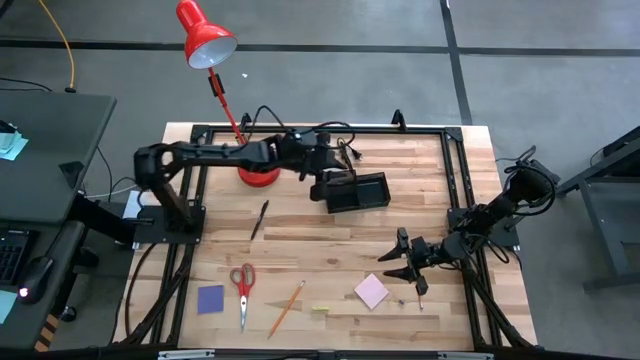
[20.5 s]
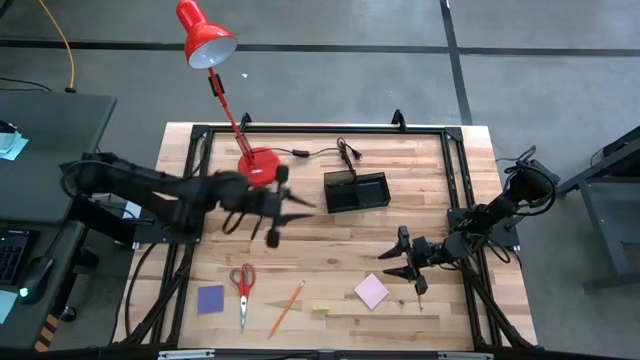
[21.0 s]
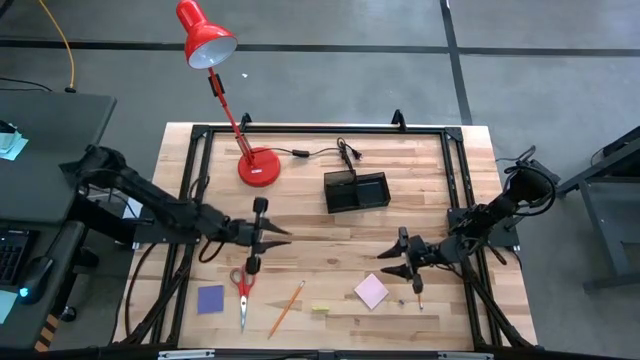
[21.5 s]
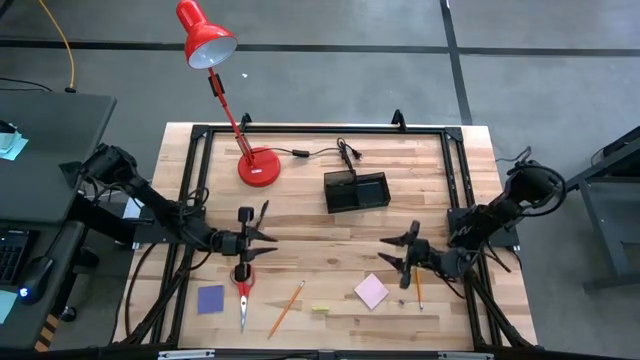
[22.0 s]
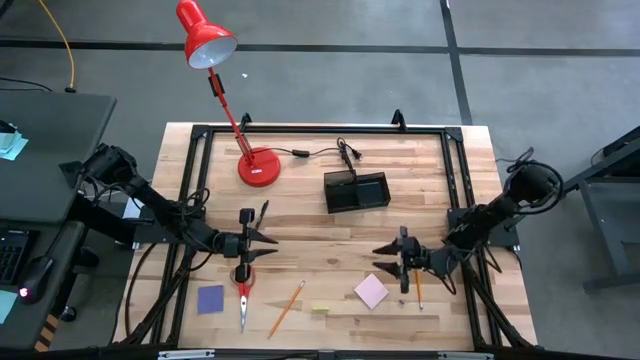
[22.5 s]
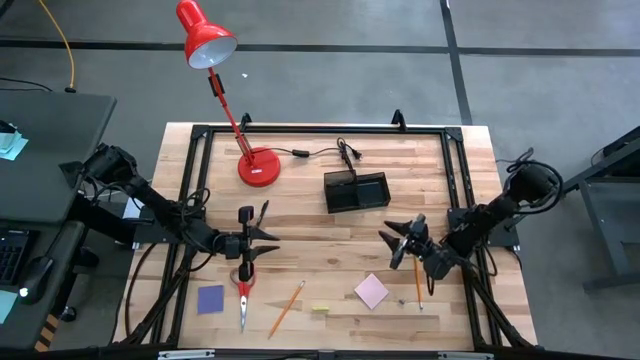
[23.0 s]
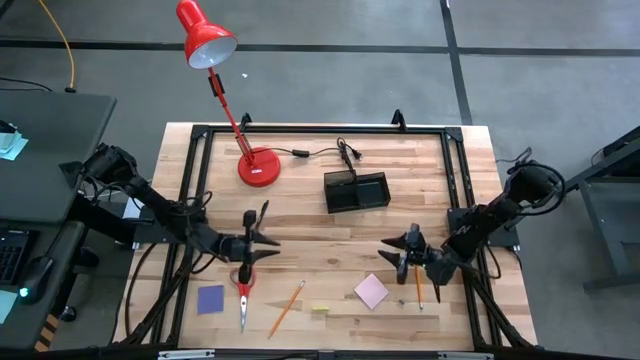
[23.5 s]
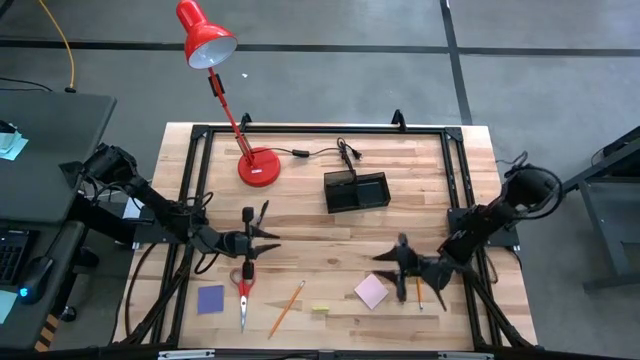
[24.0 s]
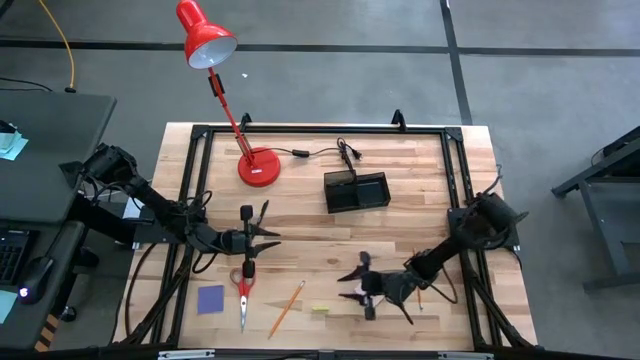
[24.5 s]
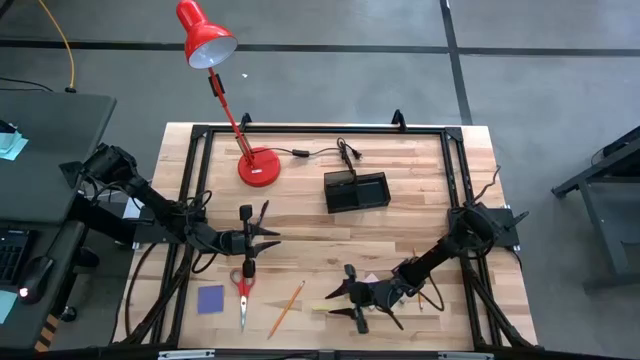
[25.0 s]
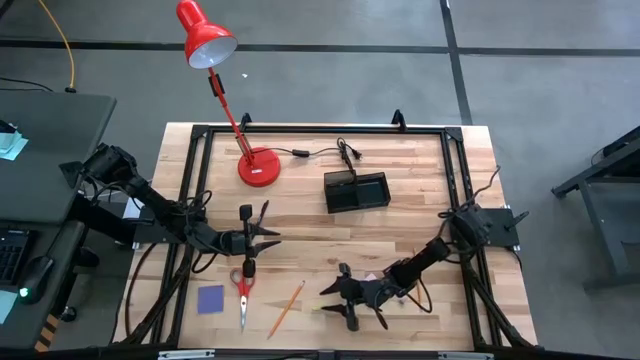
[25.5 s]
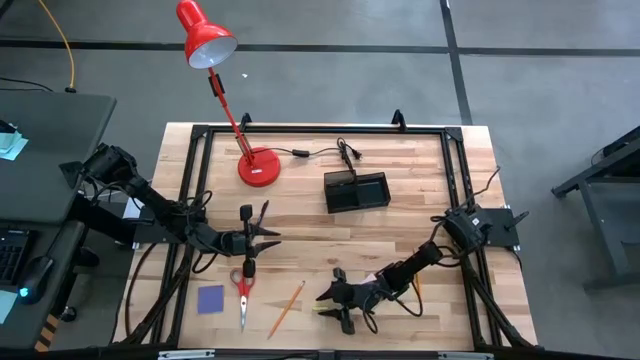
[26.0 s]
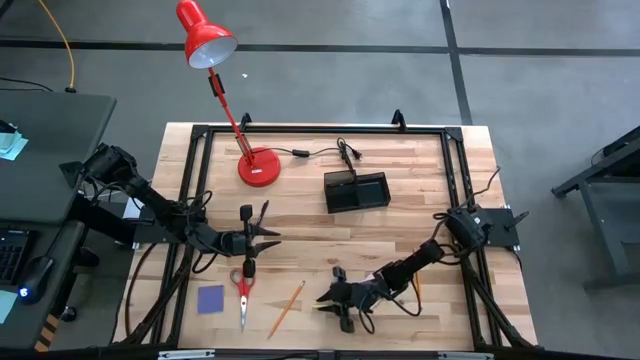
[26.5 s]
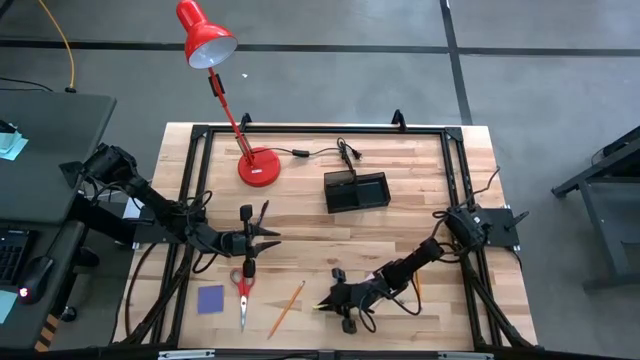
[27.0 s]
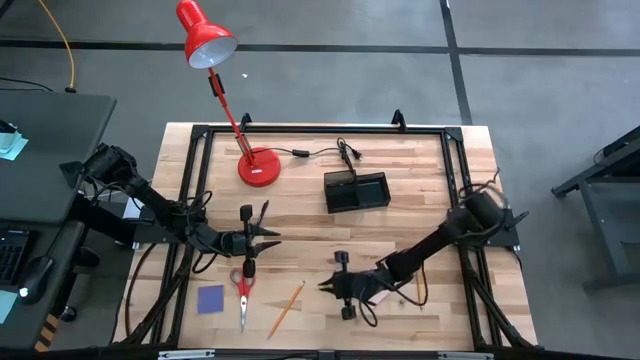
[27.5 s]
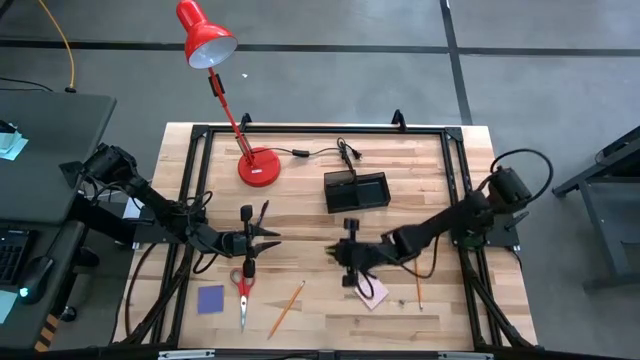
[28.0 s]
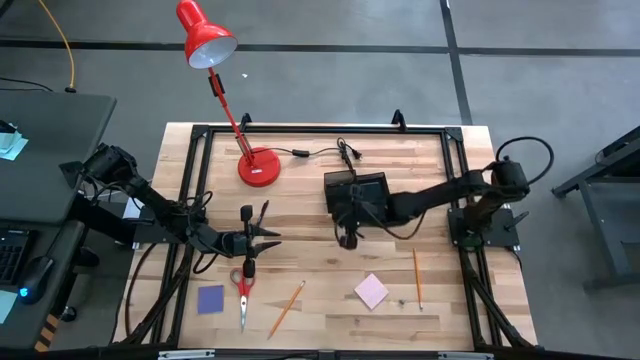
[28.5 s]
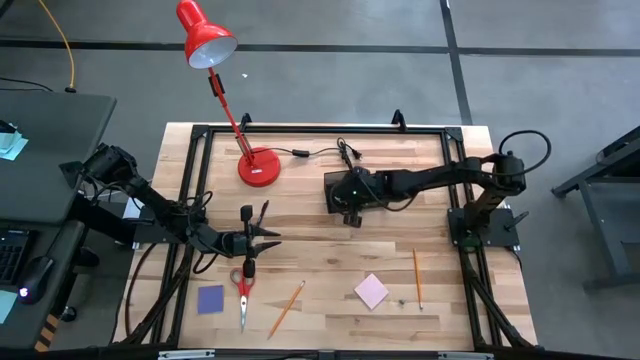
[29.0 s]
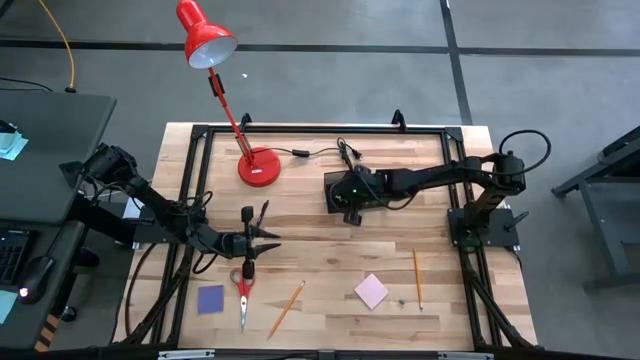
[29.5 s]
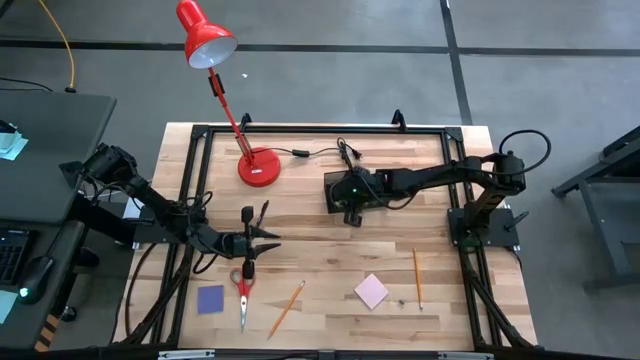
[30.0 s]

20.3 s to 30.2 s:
Task: Pick and place office supplies into organizer
Put the yellow eraser into the desk organizer

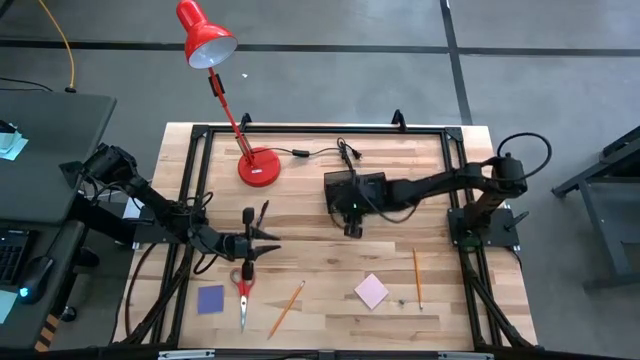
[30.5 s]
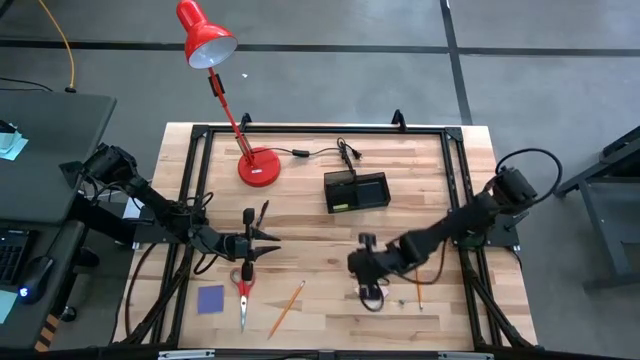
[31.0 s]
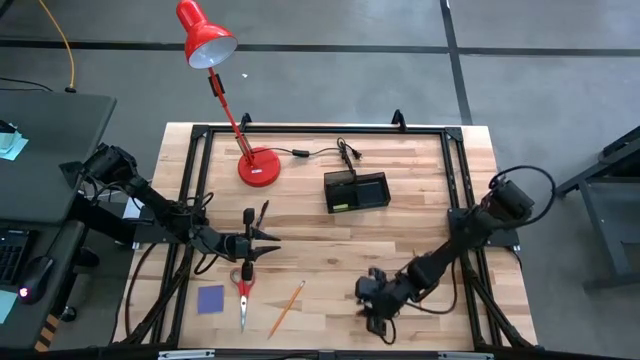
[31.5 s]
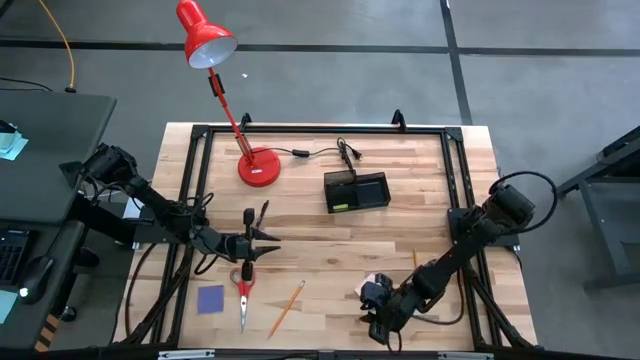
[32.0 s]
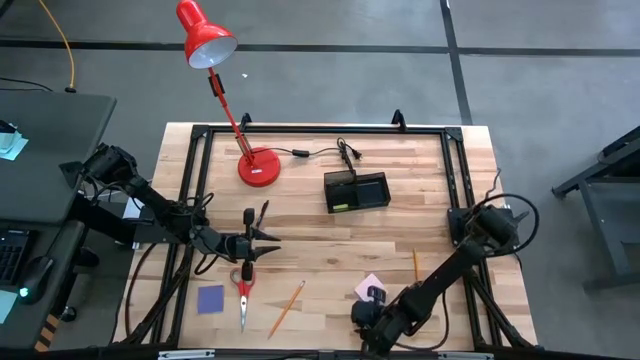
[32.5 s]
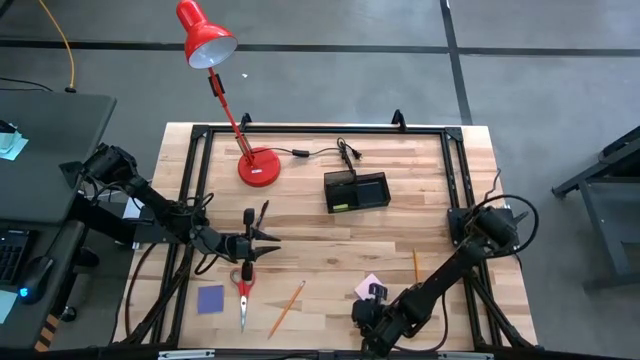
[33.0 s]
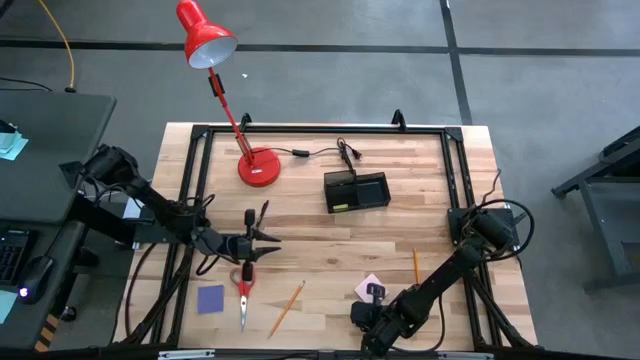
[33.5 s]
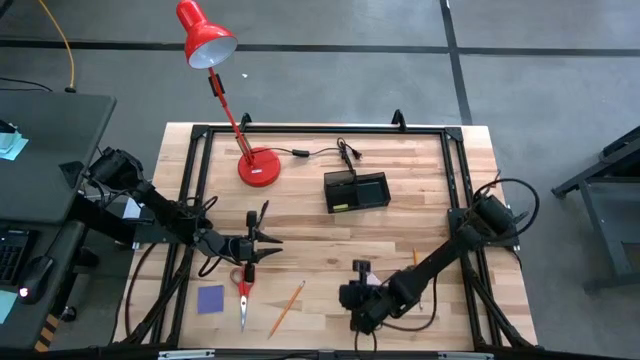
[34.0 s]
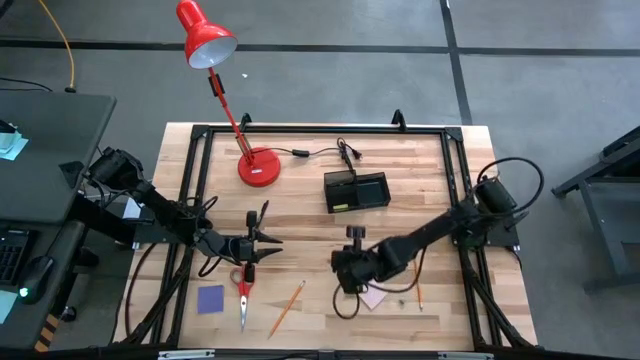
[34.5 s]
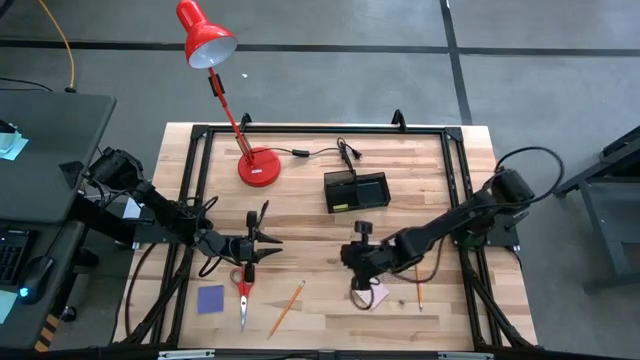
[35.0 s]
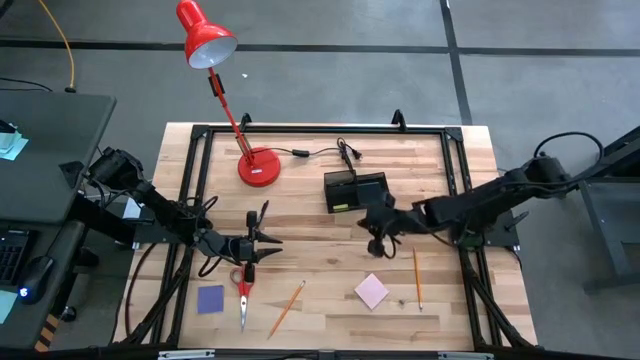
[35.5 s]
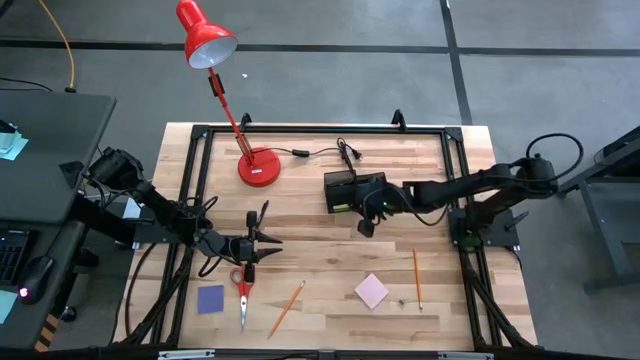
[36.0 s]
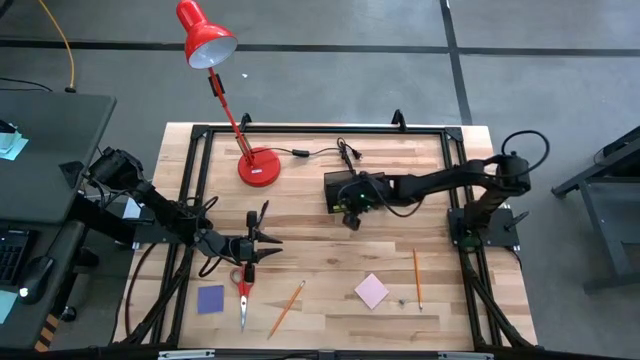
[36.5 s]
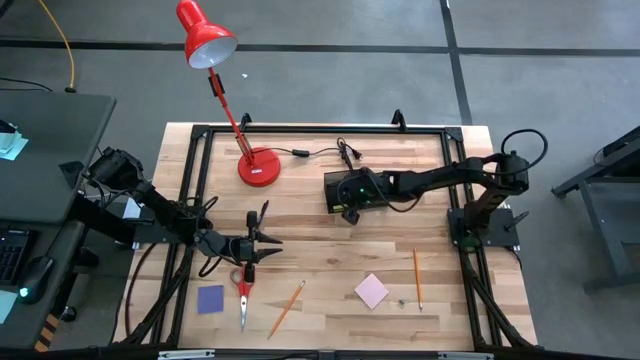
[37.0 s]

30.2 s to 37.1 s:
Put the pink binder clip into the desk organizer

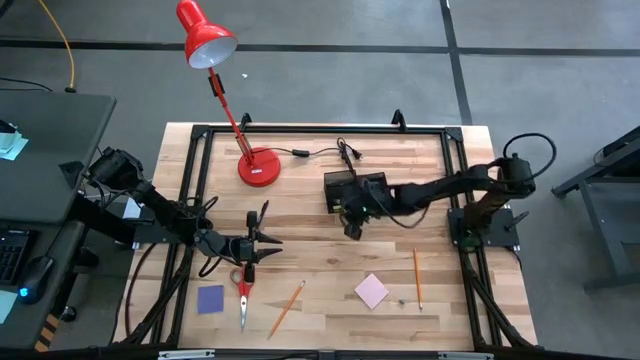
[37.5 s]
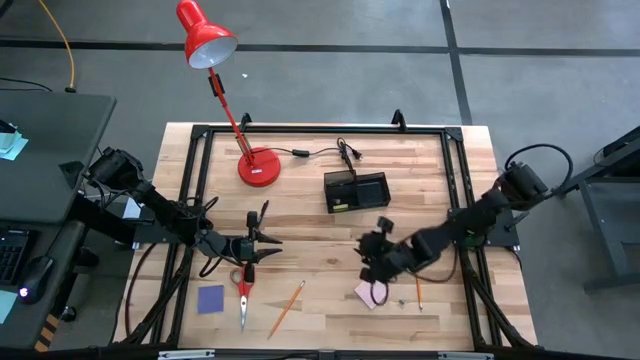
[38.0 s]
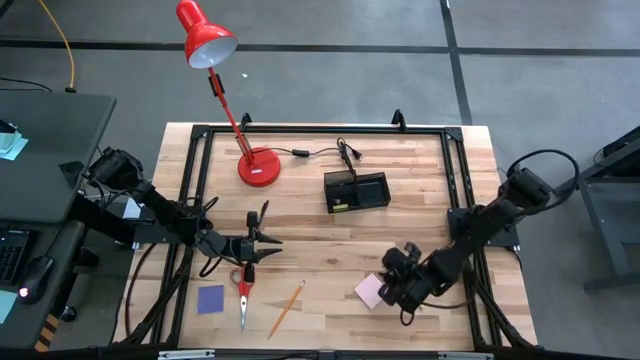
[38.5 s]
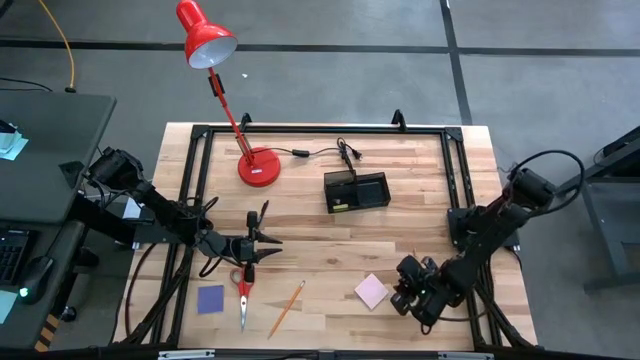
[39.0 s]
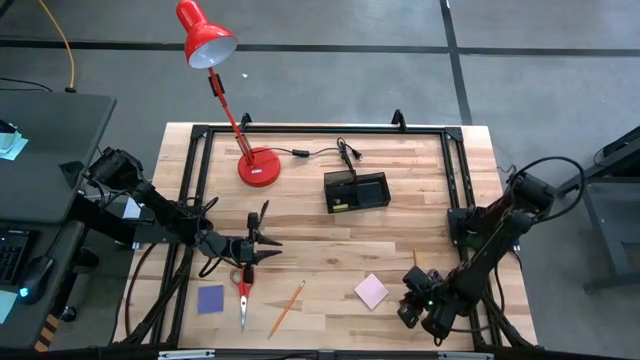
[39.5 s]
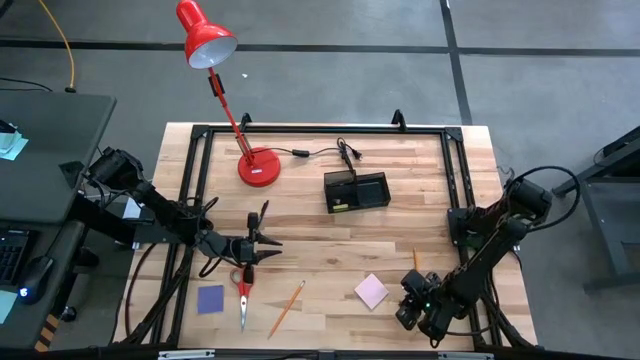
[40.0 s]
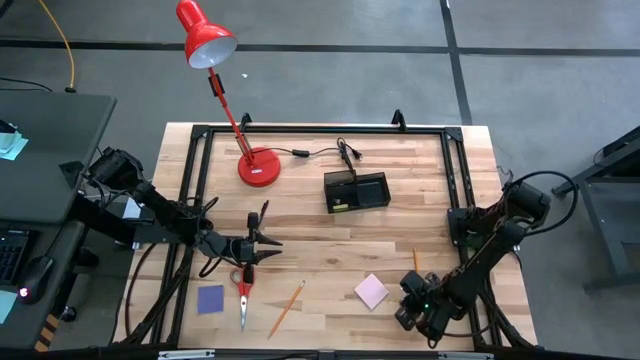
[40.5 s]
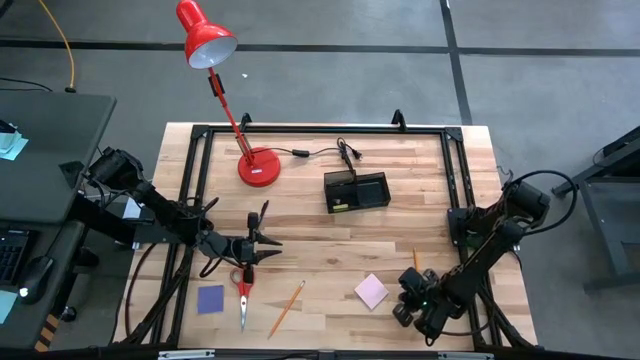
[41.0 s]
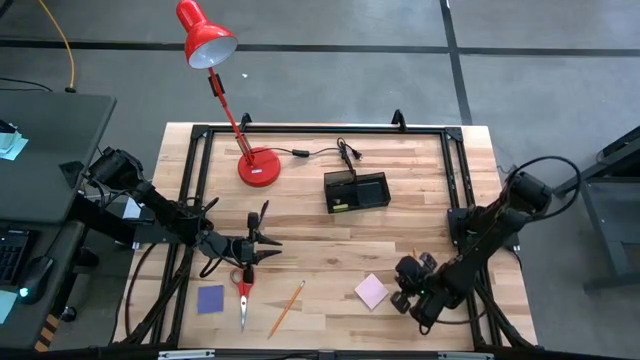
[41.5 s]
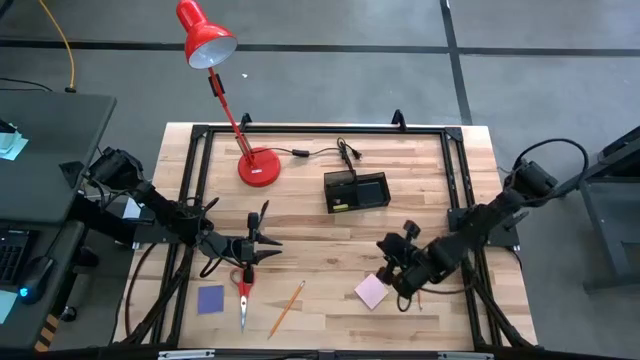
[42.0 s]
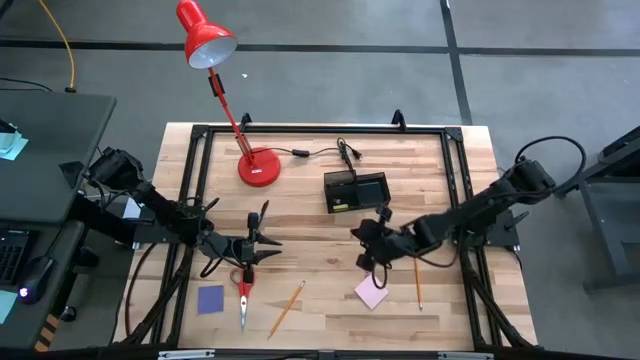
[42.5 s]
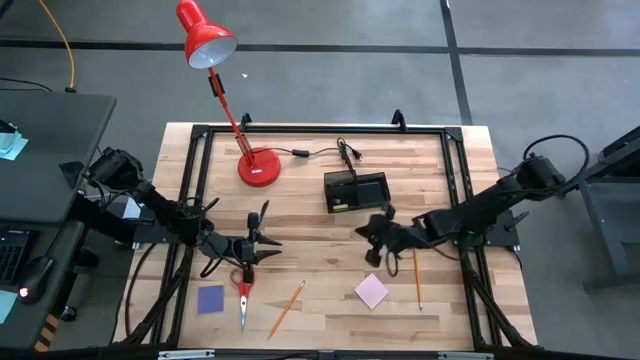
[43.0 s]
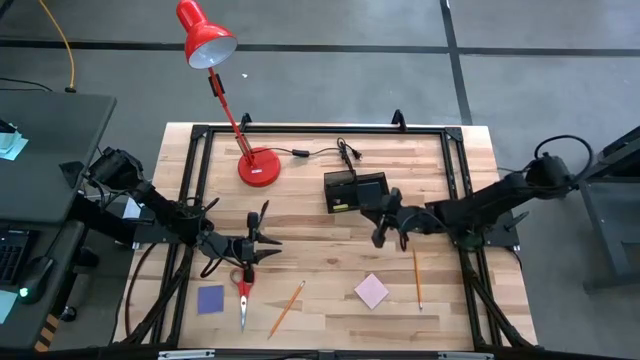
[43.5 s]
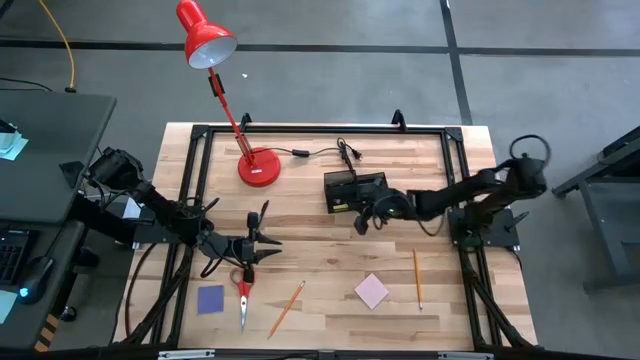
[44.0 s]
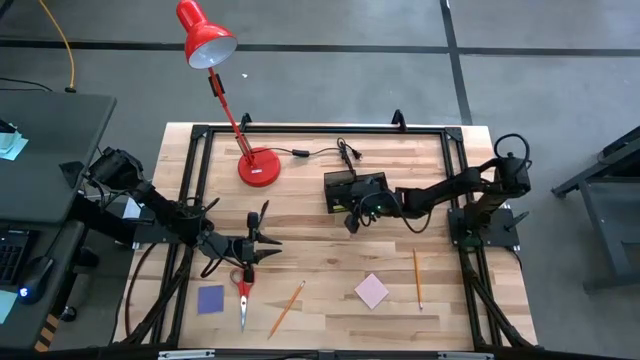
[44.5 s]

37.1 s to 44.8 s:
Put the blue binder clip into the desk organizer
